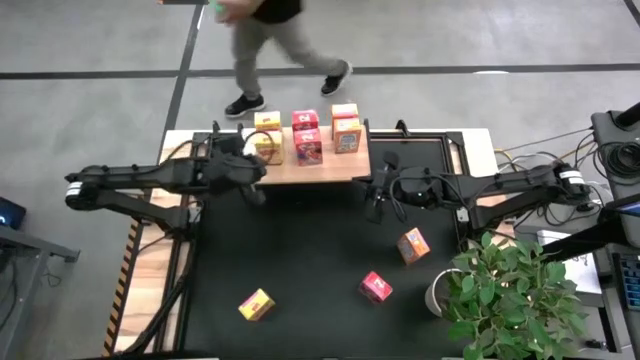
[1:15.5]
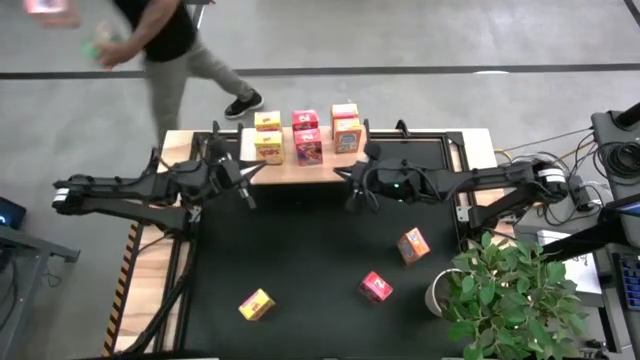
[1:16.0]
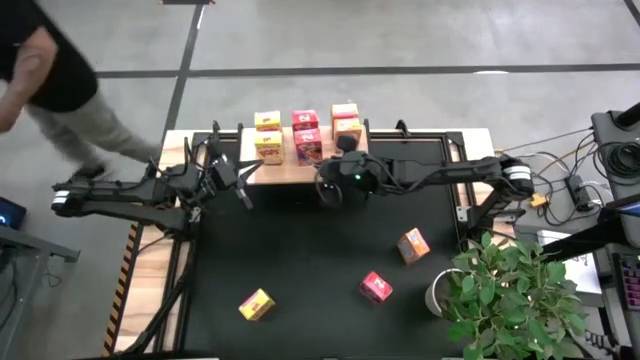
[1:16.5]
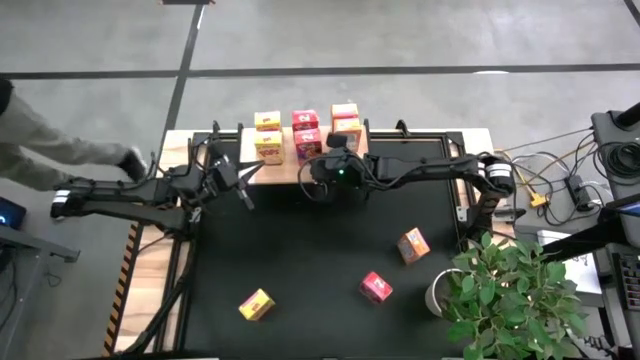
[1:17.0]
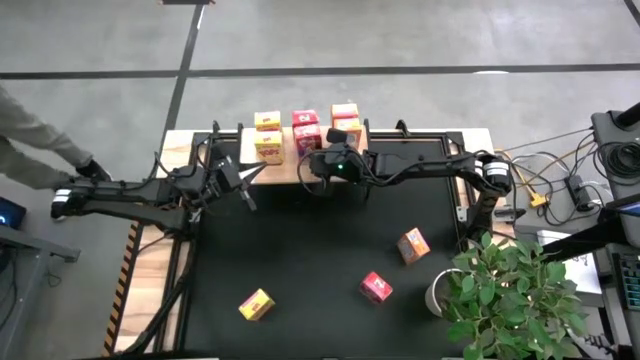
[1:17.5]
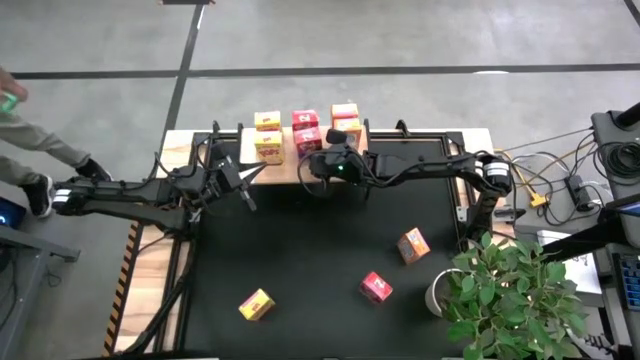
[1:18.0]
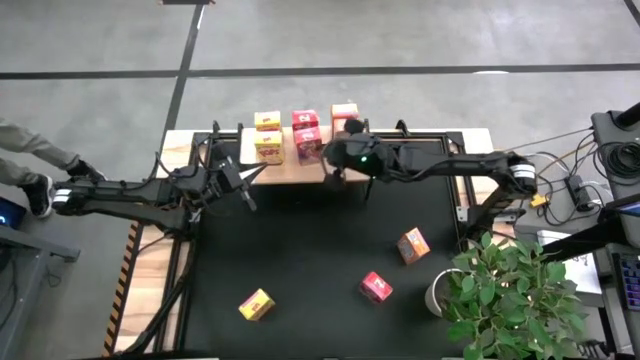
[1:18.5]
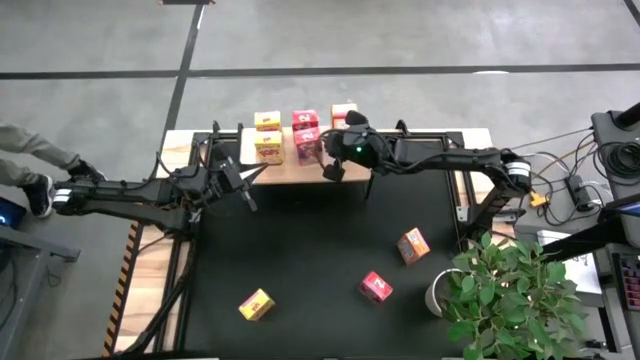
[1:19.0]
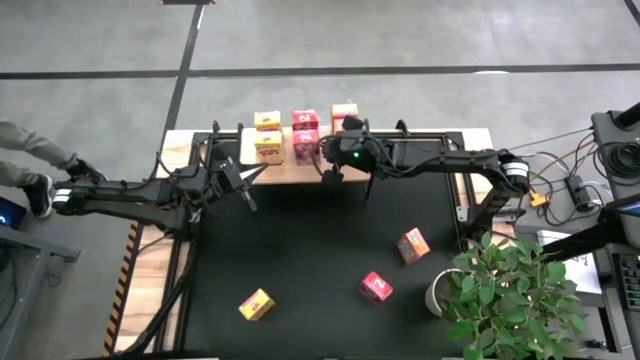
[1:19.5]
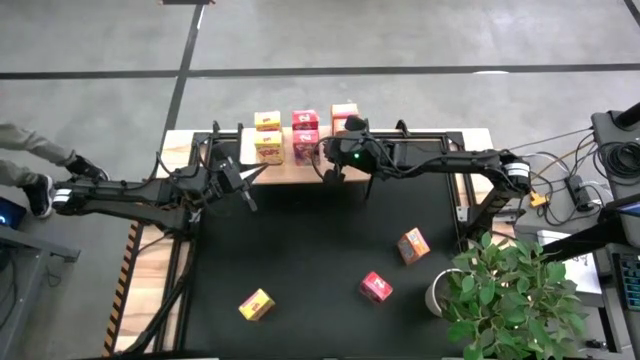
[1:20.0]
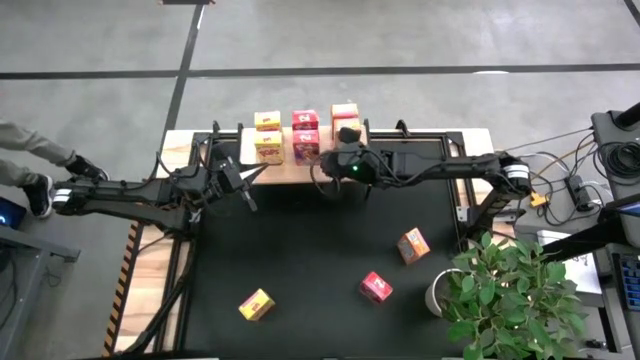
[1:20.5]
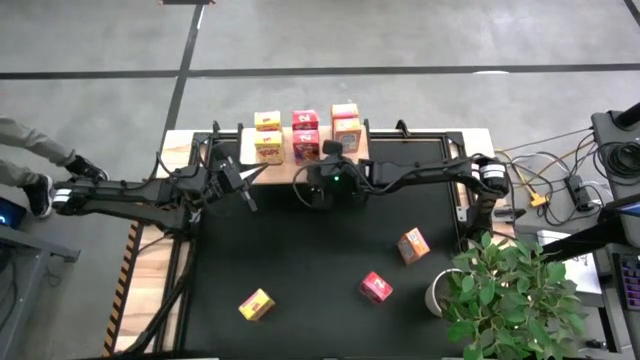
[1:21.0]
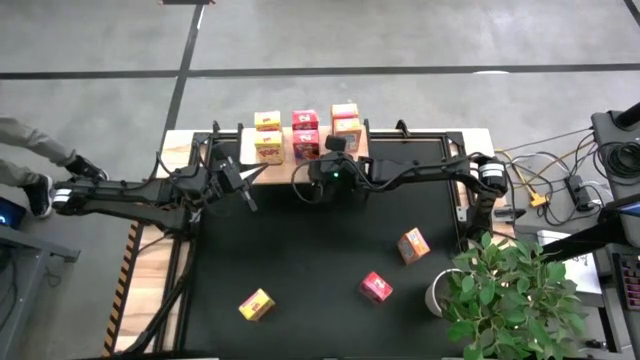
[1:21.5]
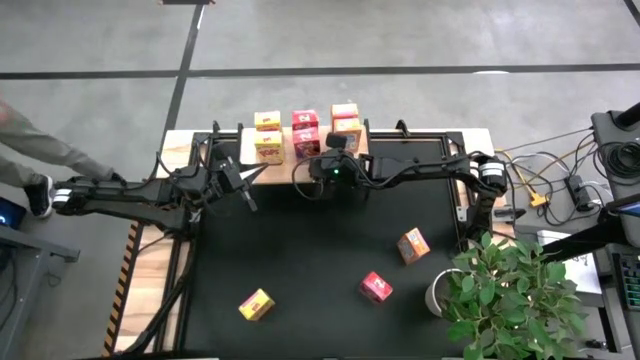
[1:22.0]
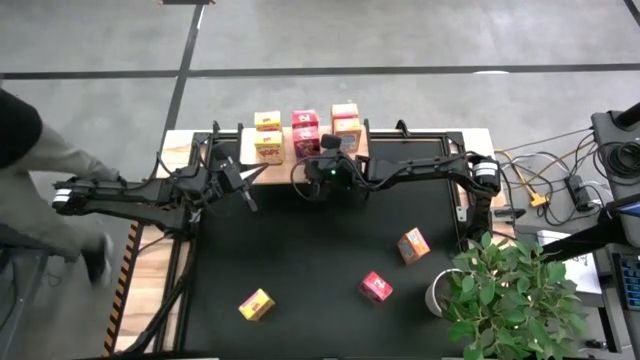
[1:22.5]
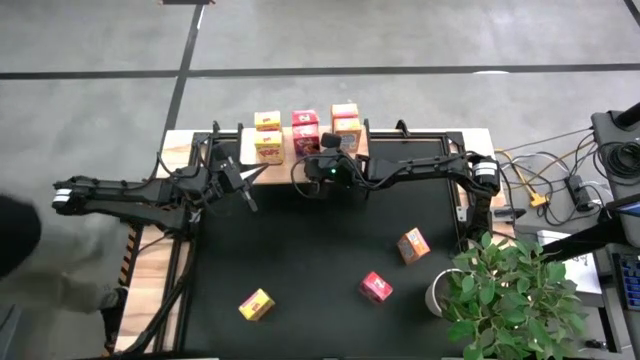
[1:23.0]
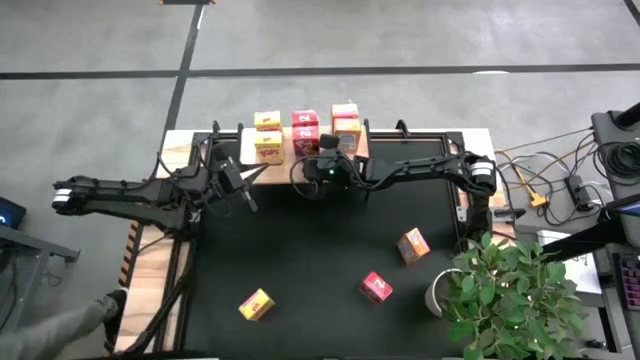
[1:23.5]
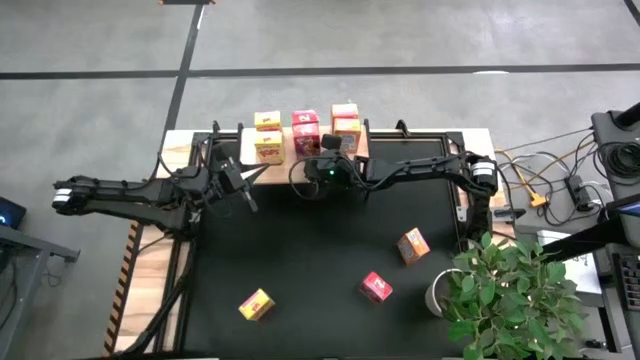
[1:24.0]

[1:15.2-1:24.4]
Task: Stack cereal on shelf
Adjust the red cereal box on the shelf

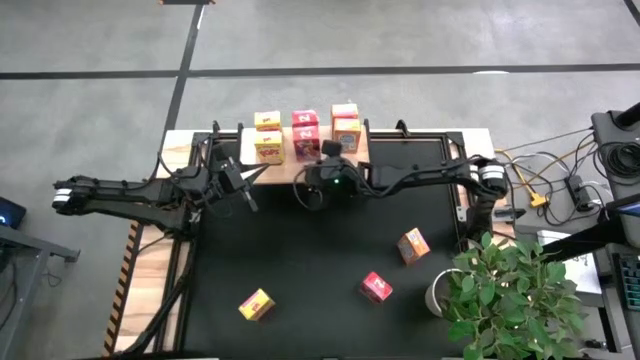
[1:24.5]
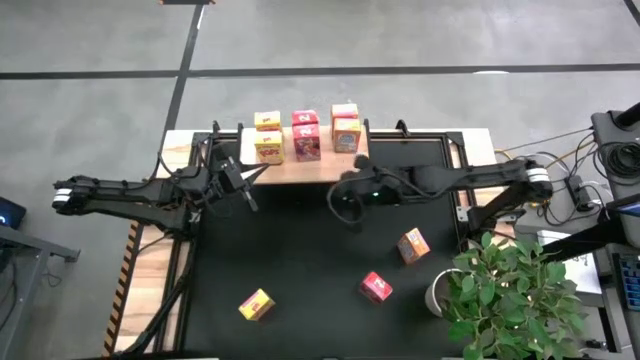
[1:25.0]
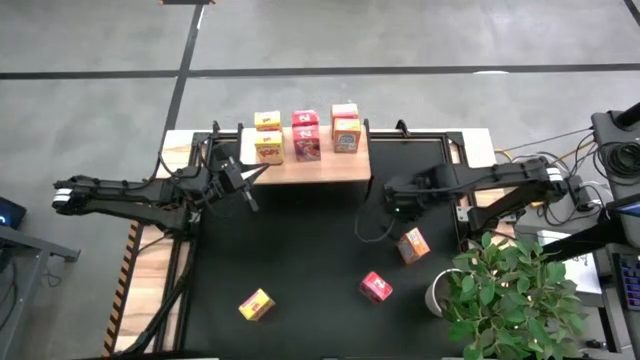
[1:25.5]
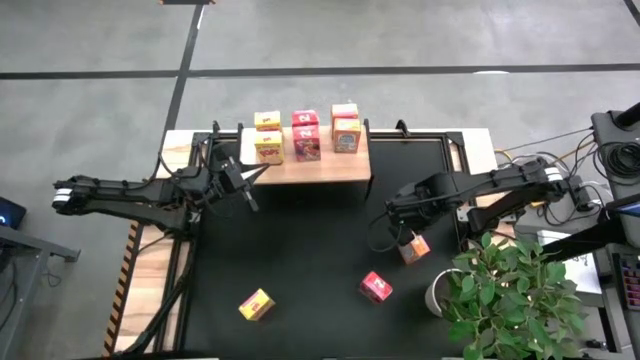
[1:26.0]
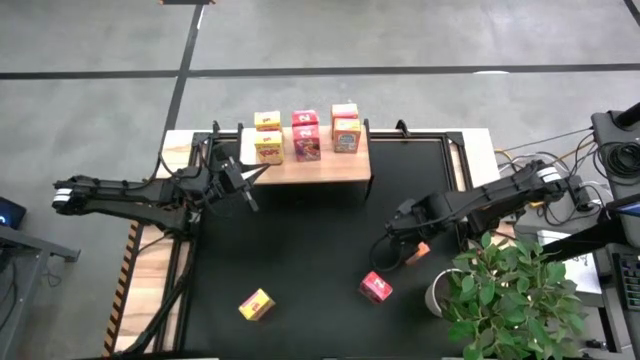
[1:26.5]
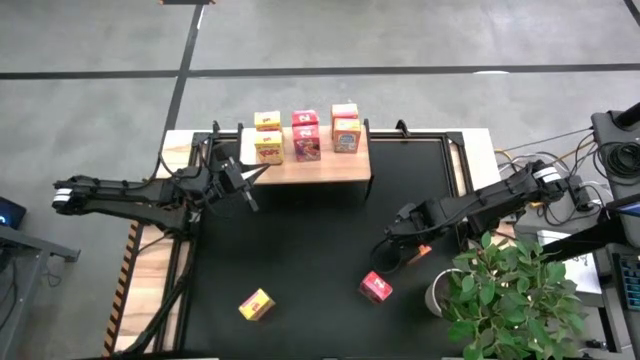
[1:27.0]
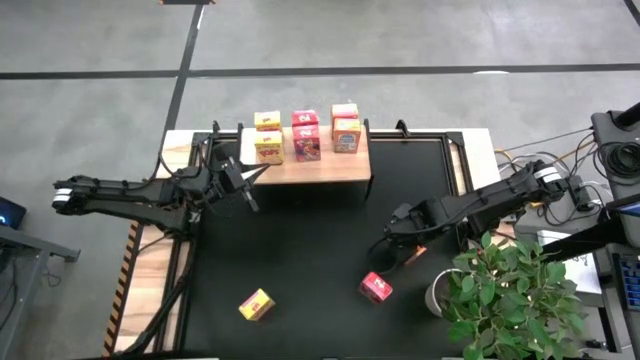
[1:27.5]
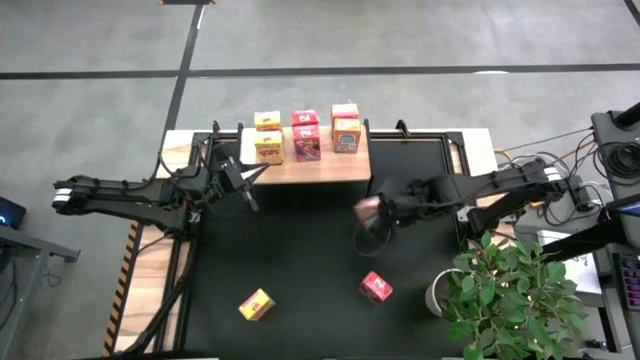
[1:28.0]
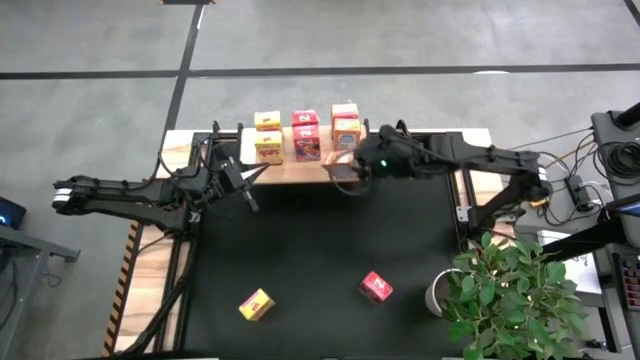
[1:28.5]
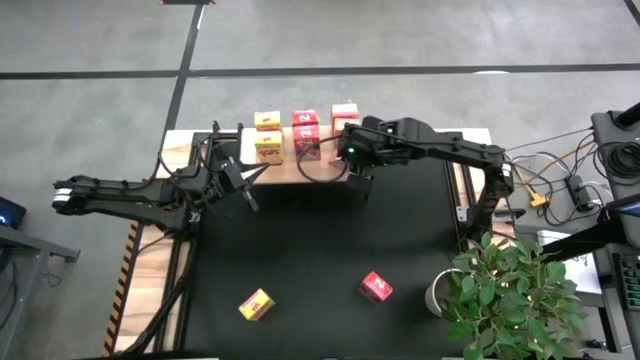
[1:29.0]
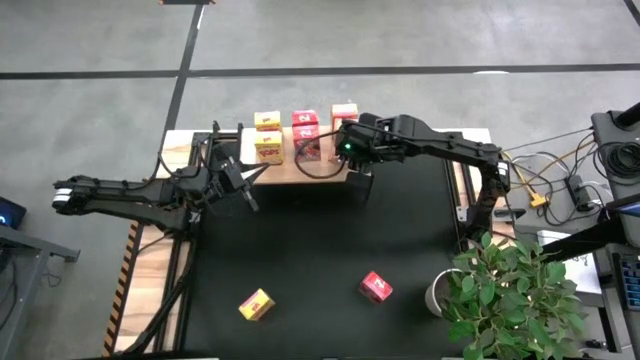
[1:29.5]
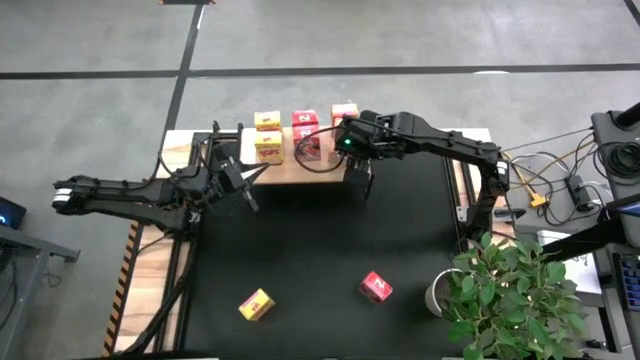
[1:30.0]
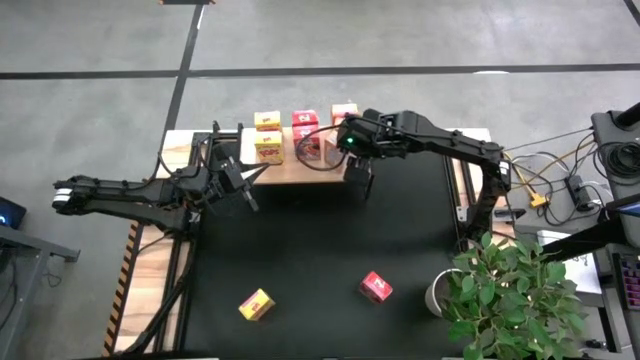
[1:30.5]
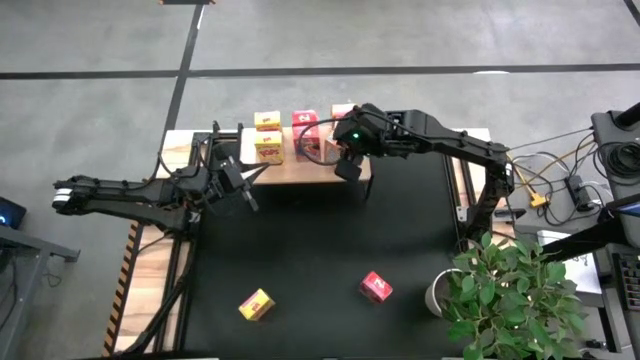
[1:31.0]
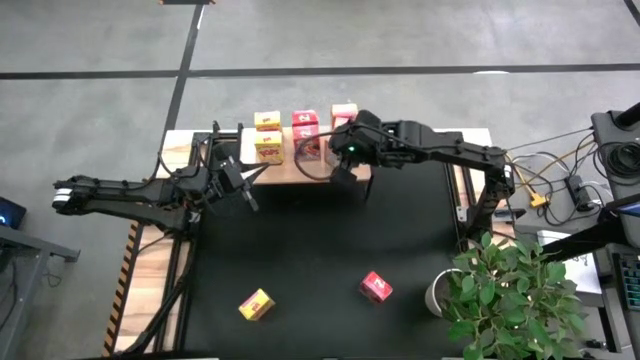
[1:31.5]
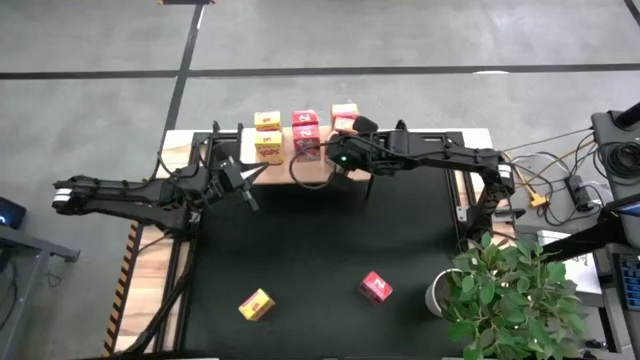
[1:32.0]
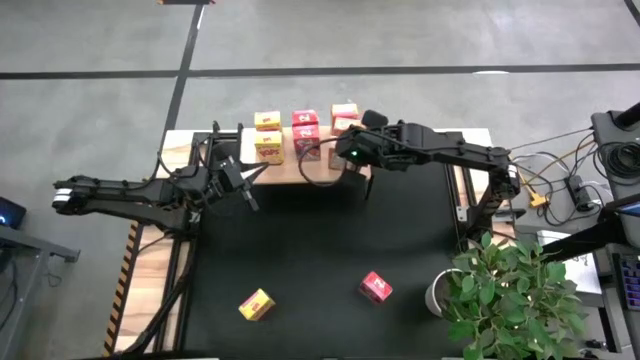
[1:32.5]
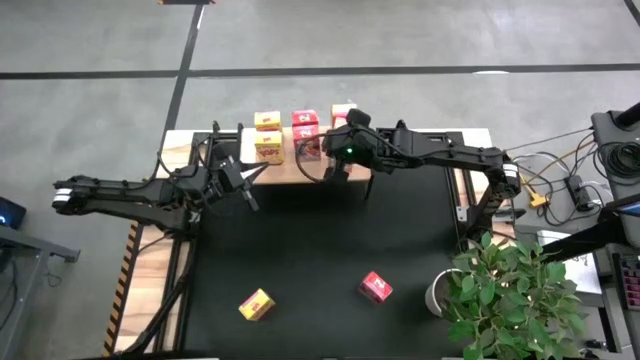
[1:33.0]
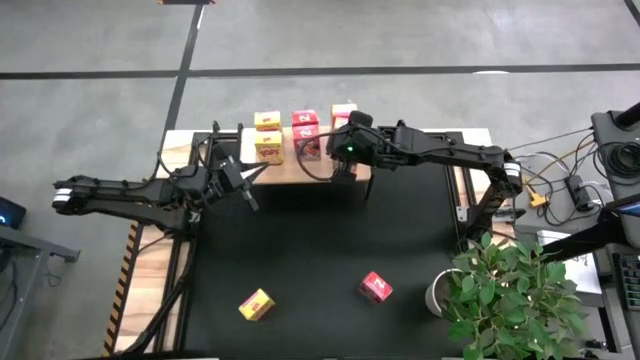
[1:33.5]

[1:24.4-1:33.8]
Put the orange cereal box aligned with the other orange cereal boxes on the shelf

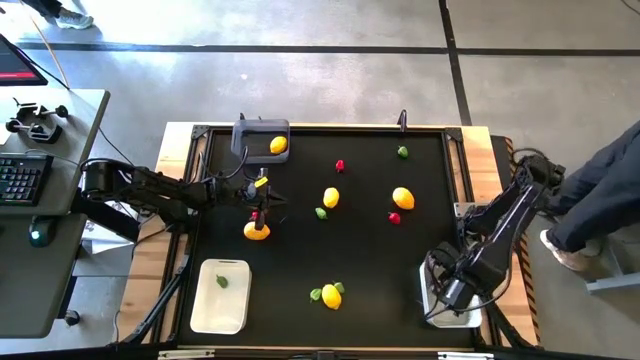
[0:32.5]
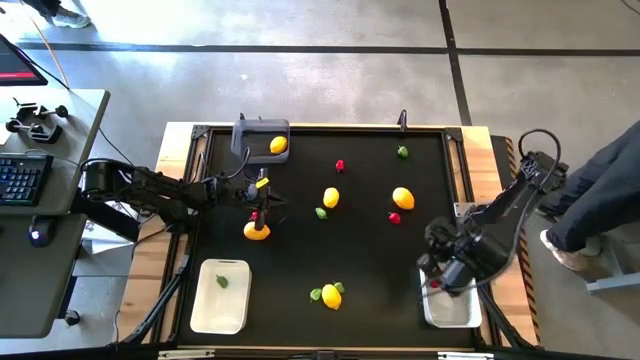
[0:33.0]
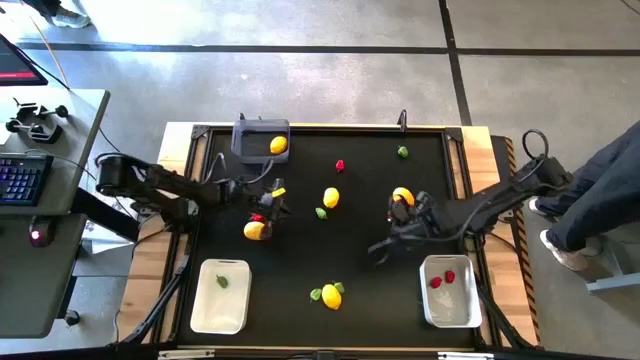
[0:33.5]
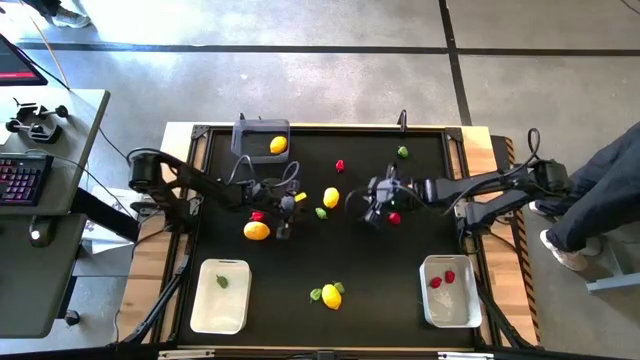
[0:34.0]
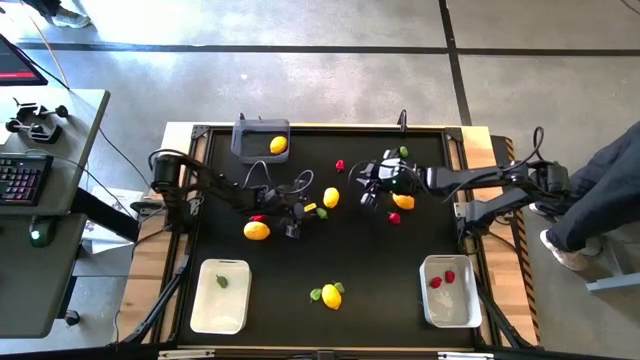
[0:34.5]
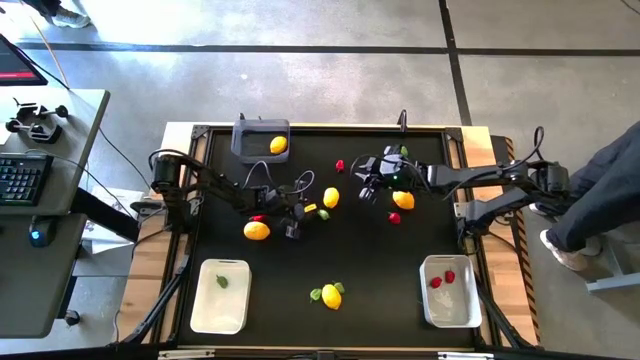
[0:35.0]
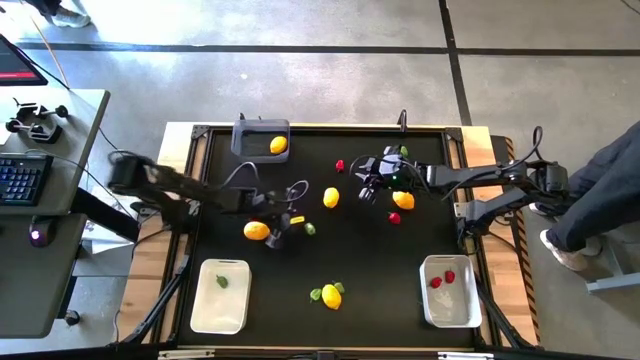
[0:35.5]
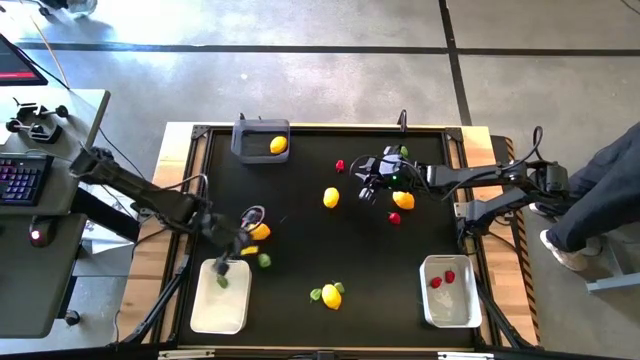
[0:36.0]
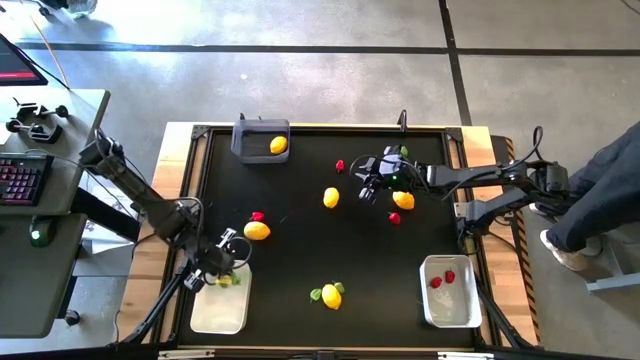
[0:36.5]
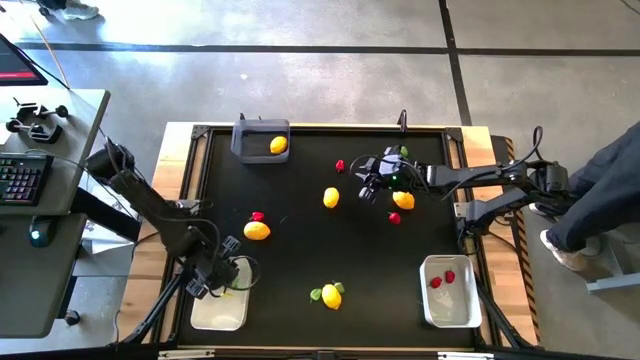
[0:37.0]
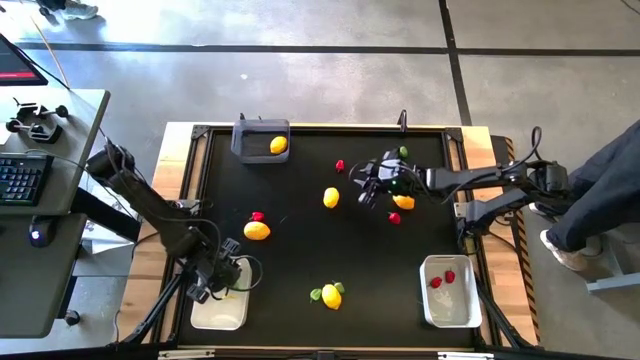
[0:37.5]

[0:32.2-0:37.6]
Task: Sort produce into baskets
Put the green chili pepper into the white bin
